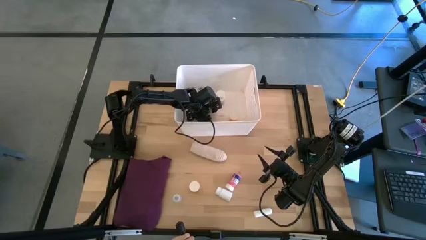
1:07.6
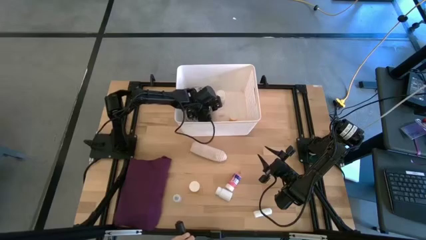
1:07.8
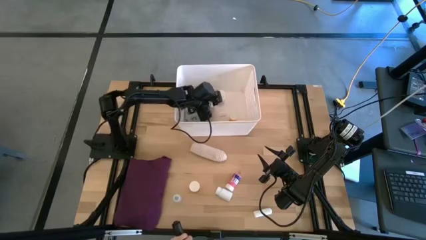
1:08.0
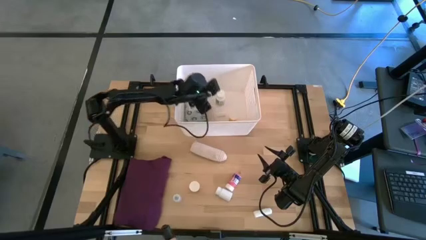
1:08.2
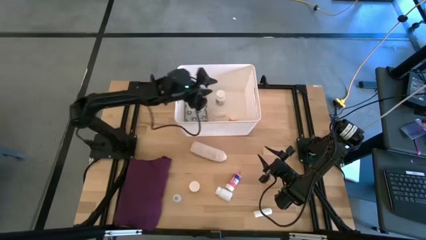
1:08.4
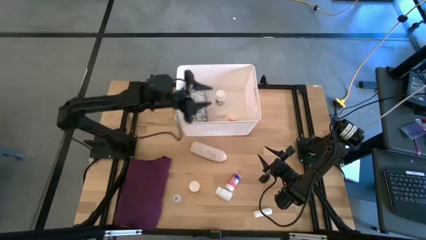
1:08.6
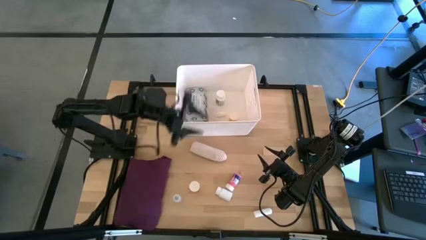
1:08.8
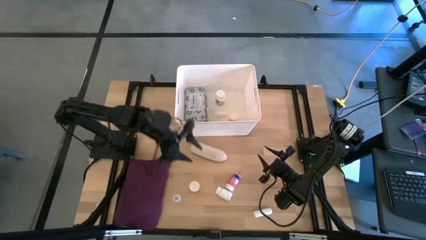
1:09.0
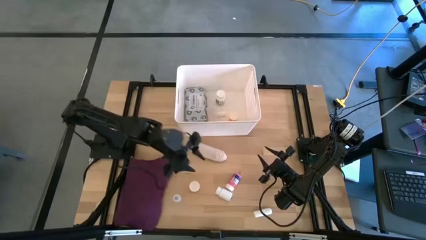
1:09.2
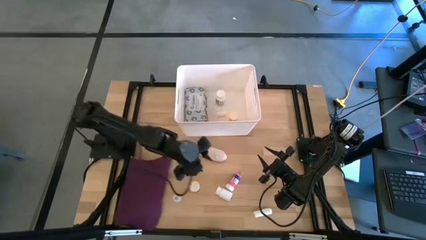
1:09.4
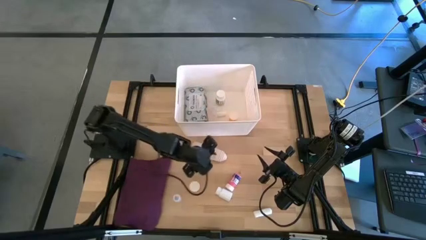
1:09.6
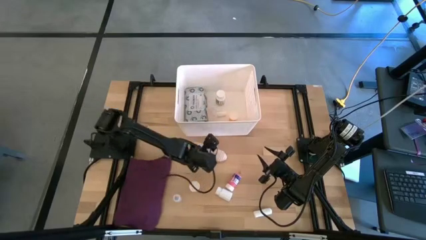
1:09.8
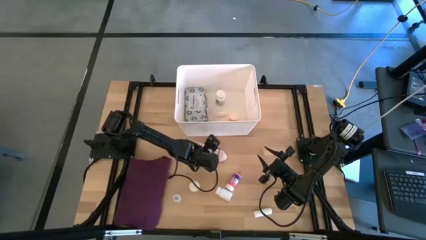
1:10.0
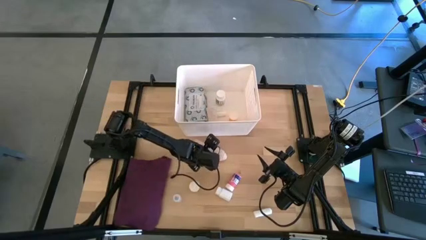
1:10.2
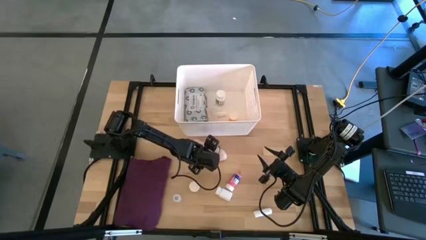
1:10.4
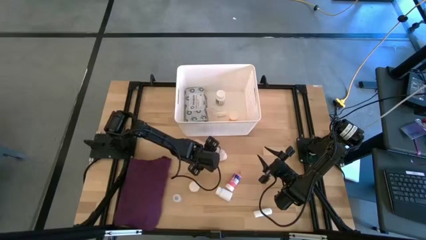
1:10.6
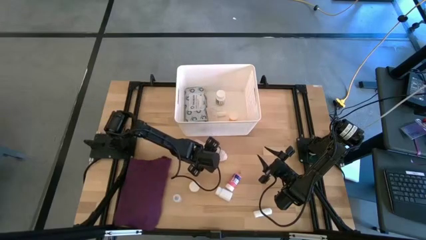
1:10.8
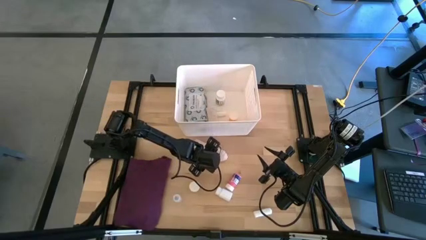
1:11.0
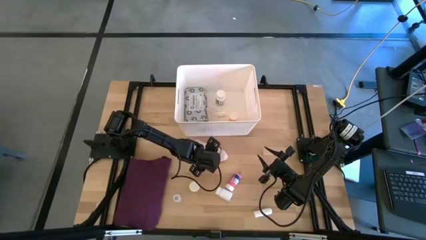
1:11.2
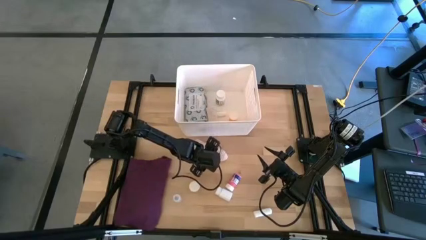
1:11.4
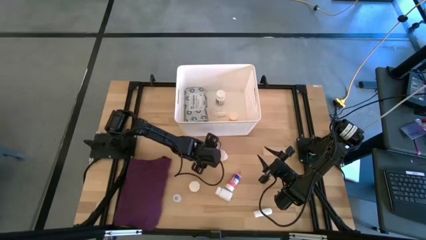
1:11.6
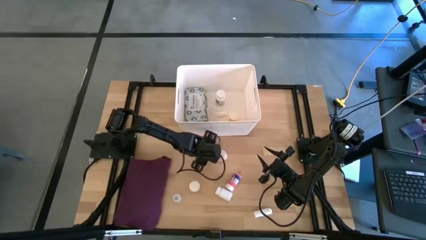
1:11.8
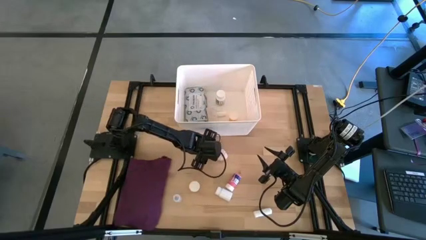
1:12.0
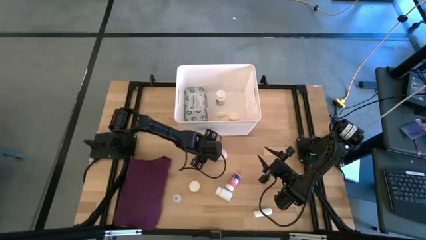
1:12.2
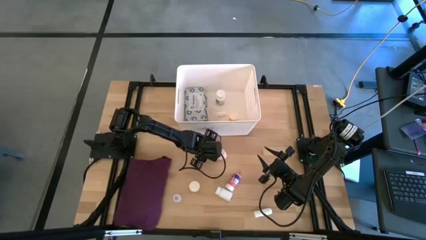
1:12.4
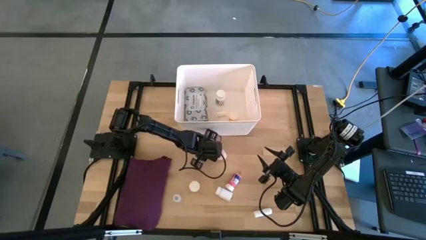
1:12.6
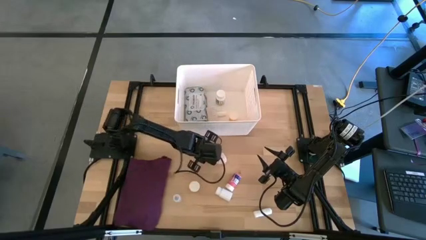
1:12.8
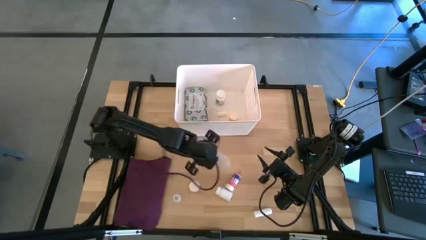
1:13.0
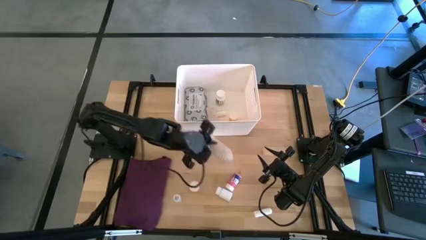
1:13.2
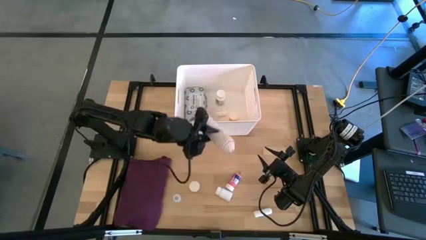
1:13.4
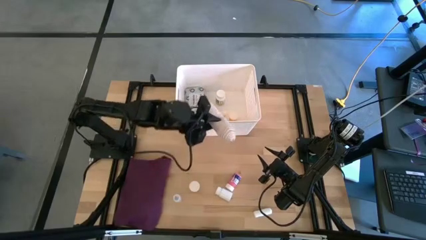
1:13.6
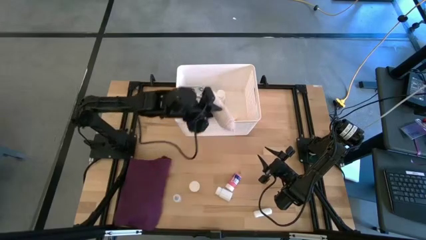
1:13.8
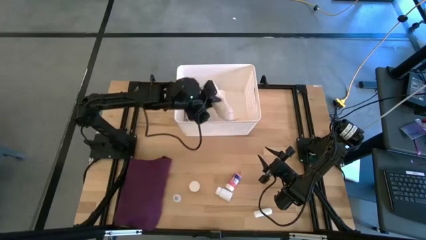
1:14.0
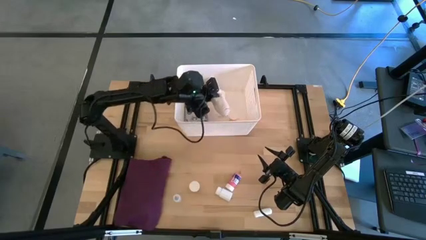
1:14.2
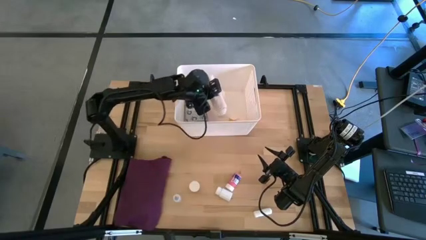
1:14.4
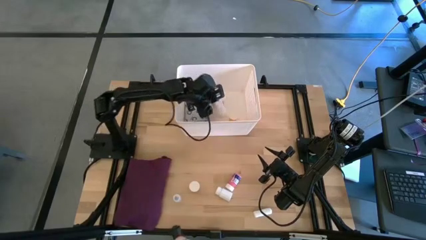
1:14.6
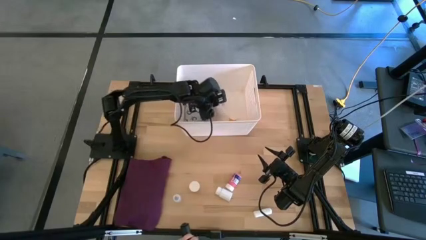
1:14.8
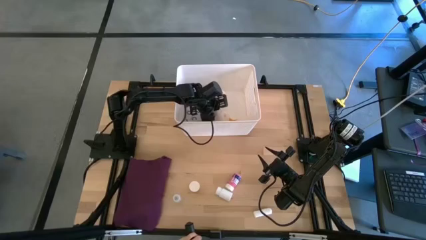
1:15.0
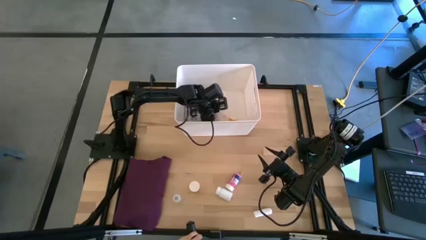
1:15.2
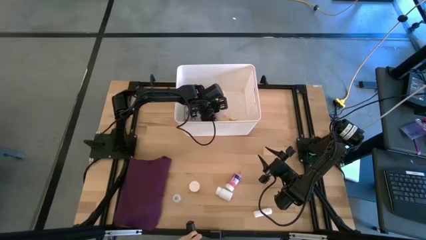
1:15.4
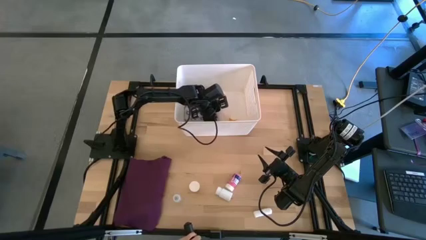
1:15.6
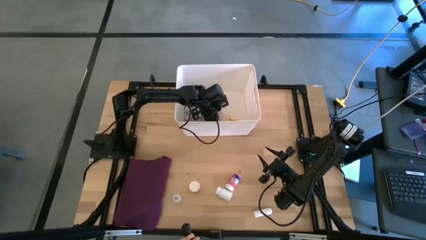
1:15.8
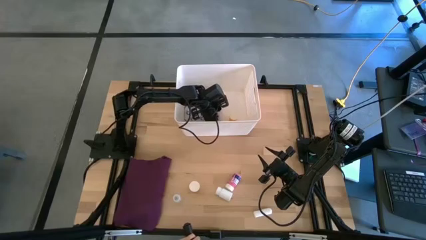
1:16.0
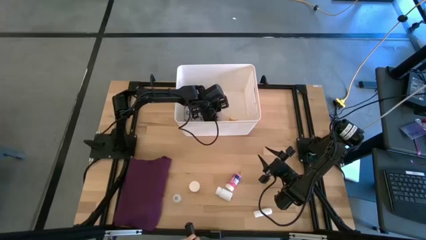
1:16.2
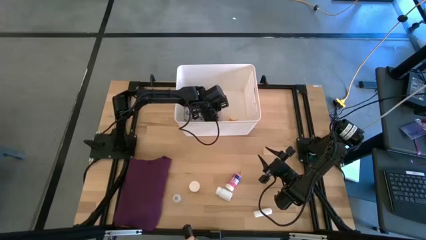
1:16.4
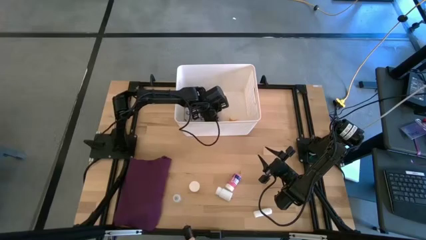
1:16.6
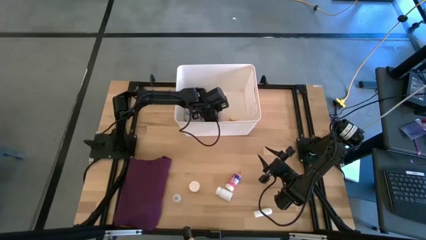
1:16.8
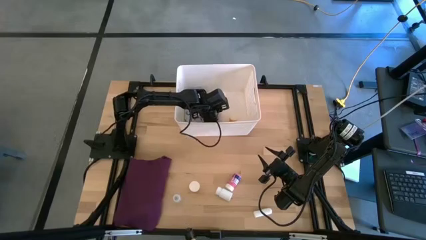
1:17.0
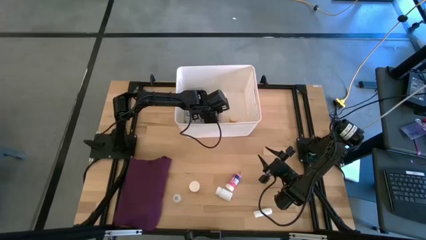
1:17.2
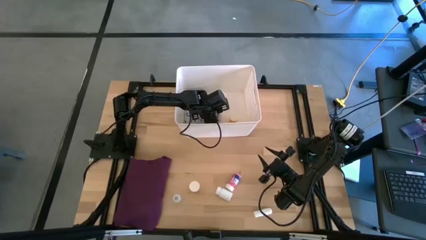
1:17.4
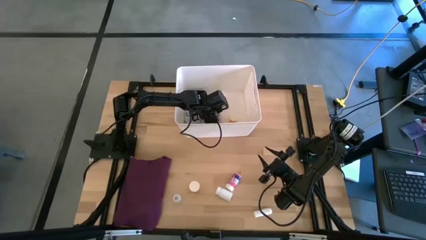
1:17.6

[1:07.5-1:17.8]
Task: Pick & place medical supplies in basket/bin
Put the white bandage into the white bin

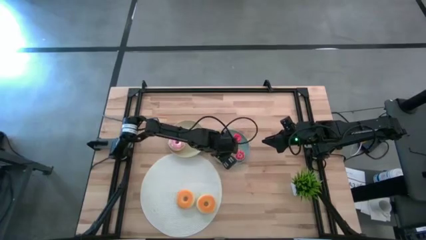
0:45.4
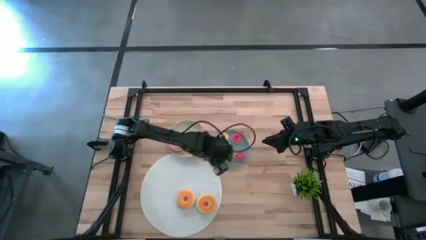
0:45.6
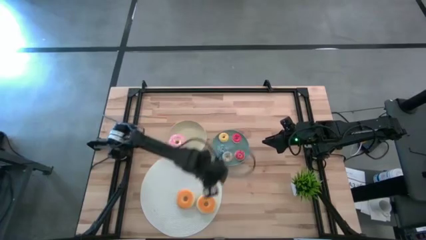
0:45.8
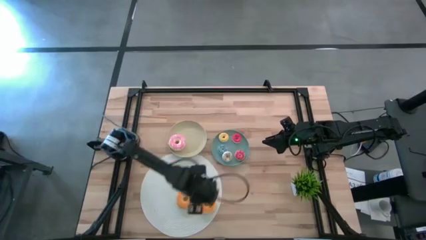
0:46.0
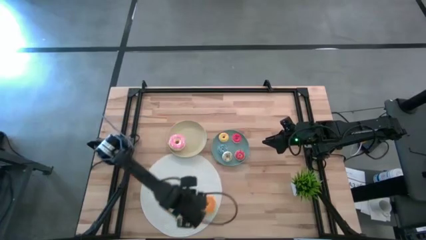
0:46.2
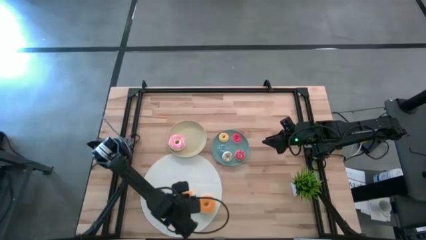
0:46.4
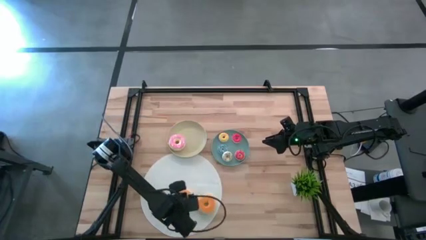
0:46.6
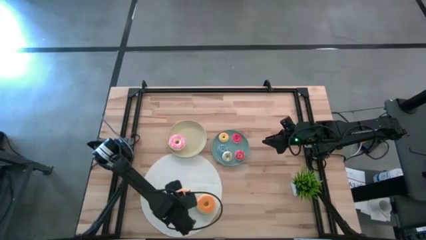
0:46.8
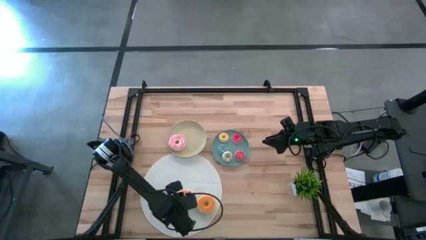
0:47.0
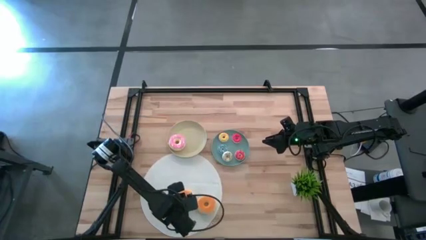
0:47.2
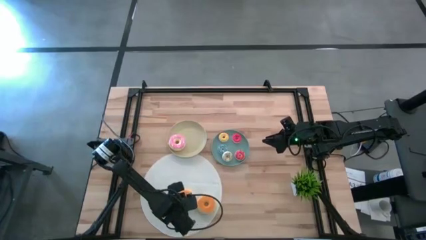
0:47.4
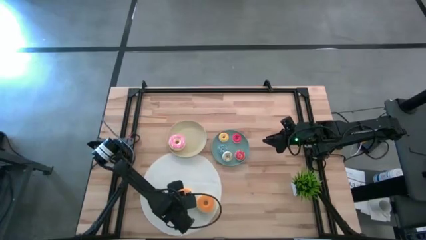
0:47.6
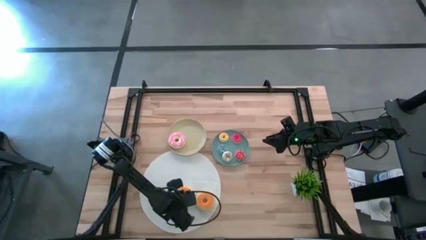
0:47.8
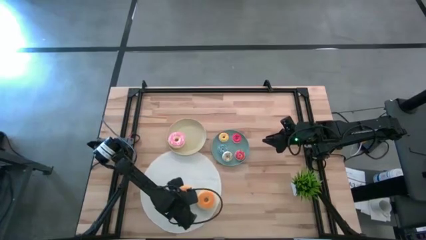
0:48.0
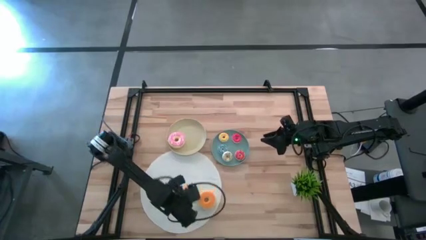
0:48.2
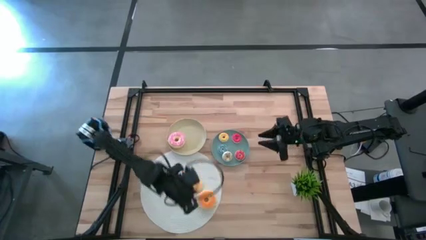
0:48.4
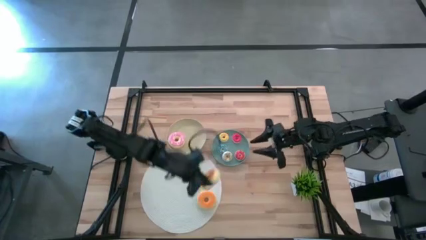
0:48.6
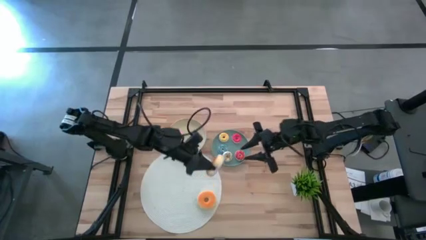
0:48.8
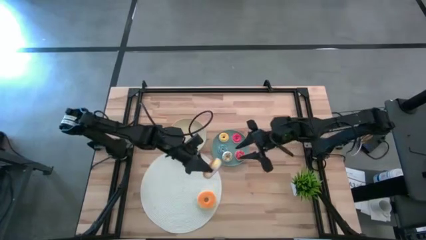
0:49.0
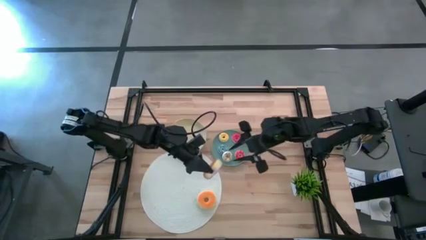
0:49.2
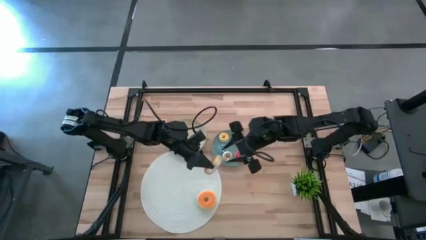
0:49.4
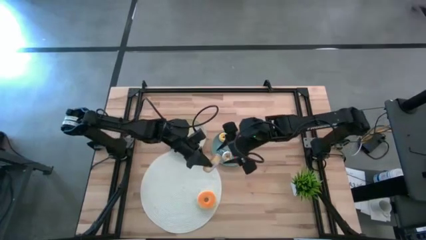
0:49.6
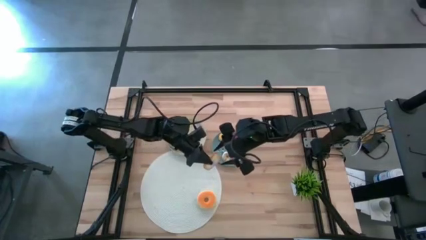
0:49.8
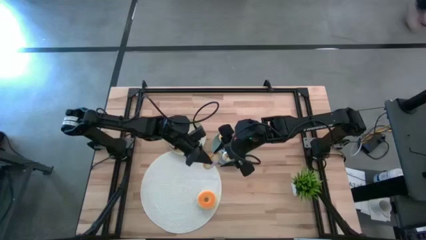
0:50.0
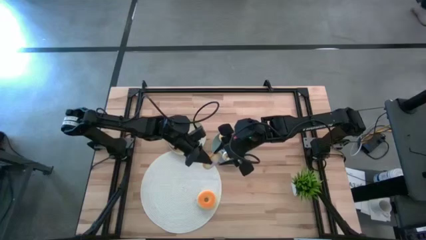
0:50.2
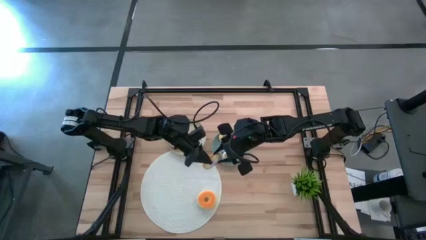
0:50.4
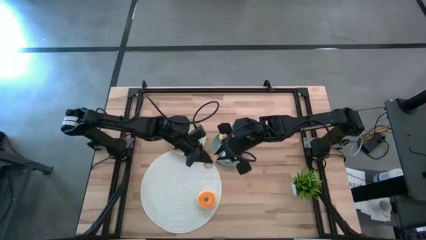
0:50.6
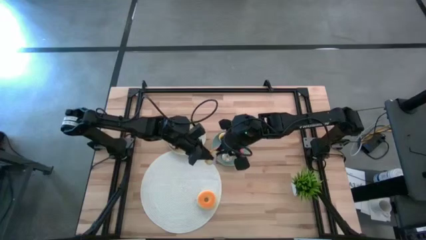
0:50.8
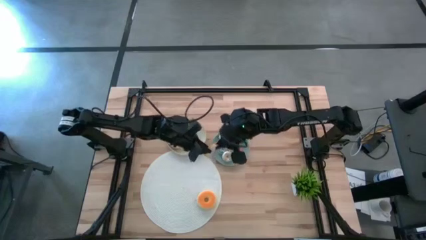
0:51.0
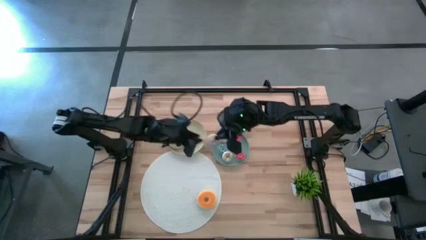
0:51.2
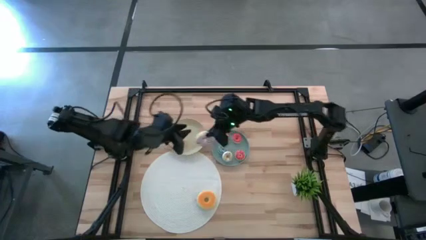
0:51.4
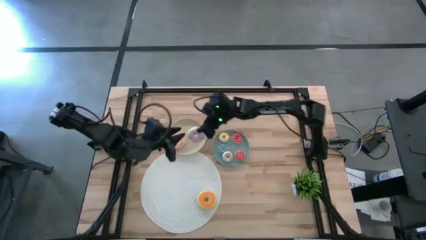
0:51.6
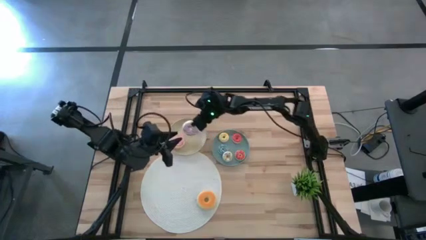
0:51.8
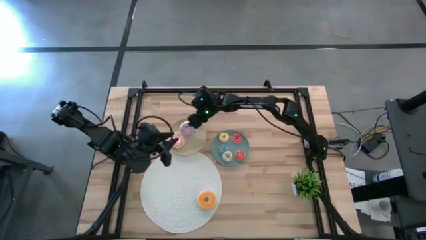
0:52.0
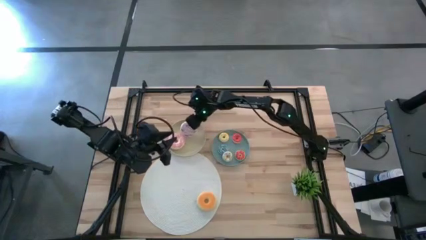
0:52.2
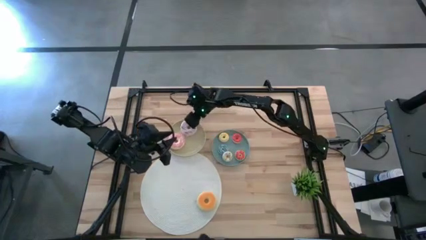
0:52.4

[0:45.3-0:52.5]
Task: Pick & Place donuts
Put the big violet donut on the brown plate
